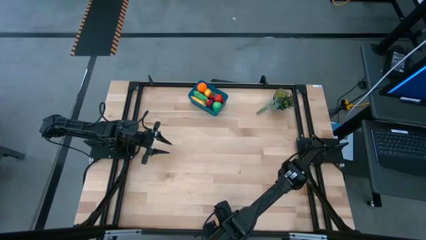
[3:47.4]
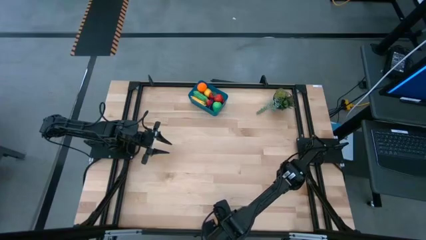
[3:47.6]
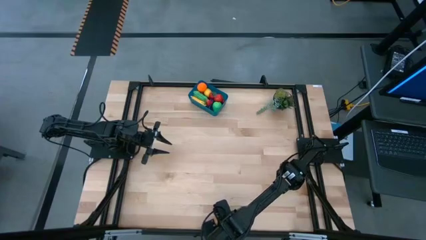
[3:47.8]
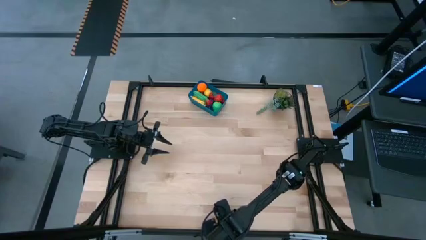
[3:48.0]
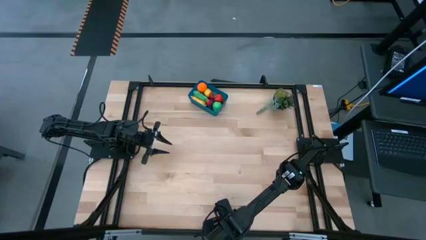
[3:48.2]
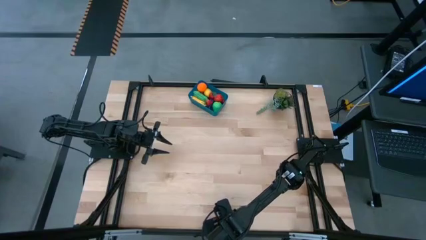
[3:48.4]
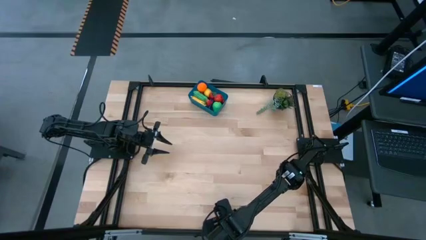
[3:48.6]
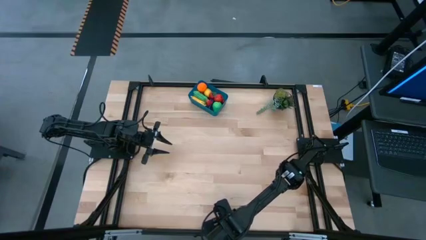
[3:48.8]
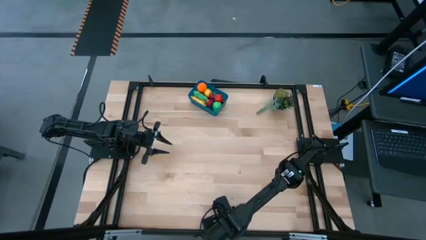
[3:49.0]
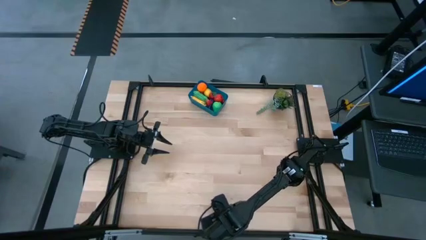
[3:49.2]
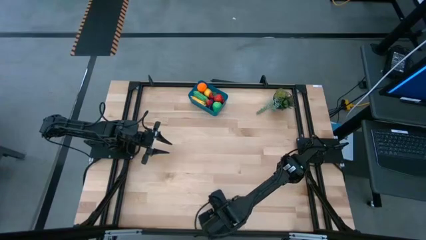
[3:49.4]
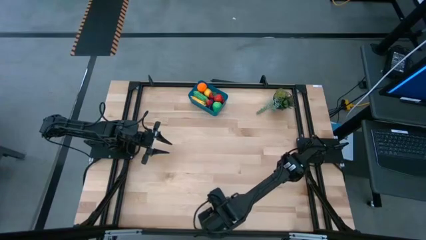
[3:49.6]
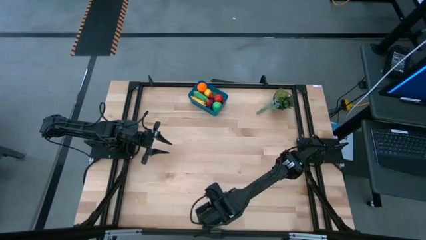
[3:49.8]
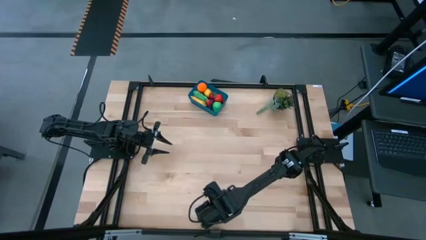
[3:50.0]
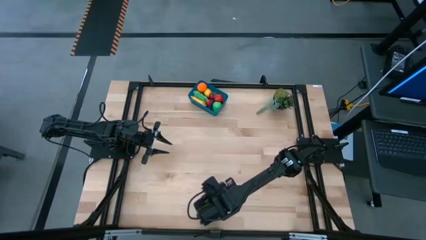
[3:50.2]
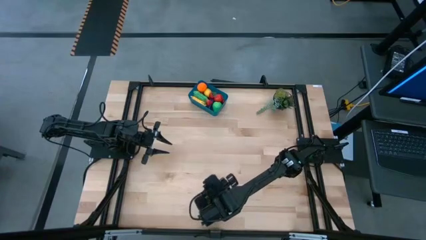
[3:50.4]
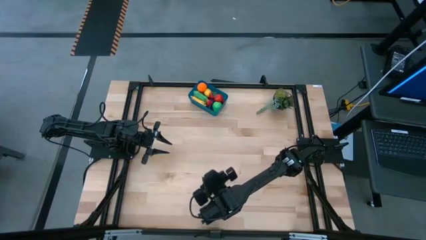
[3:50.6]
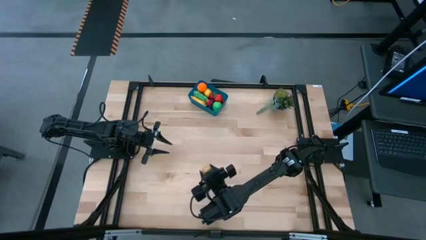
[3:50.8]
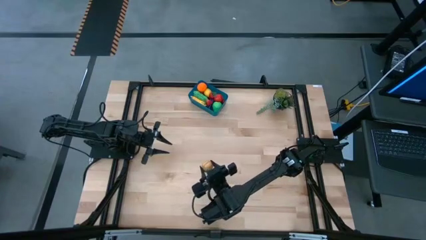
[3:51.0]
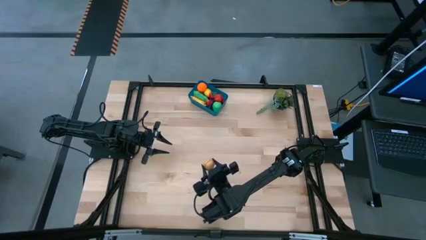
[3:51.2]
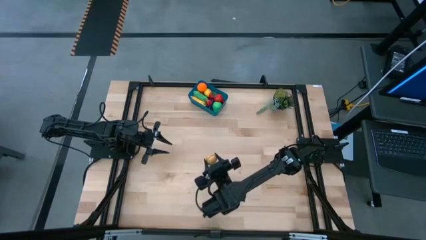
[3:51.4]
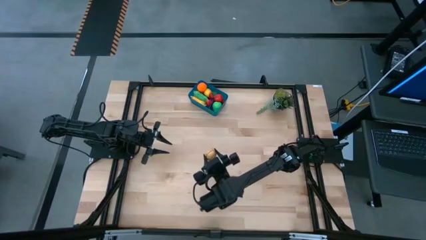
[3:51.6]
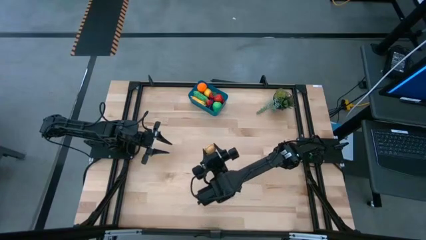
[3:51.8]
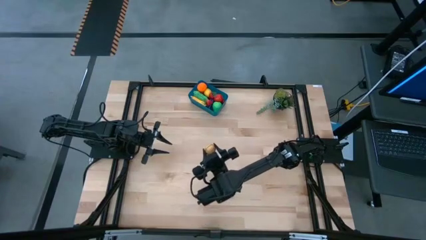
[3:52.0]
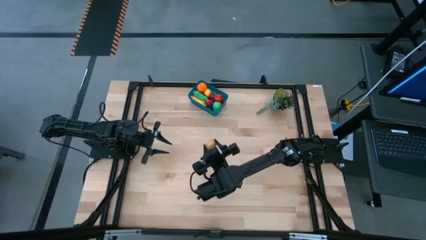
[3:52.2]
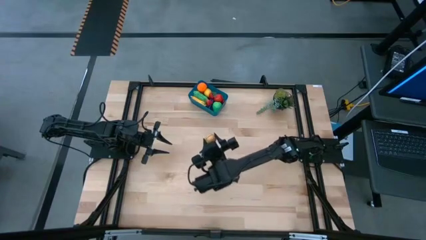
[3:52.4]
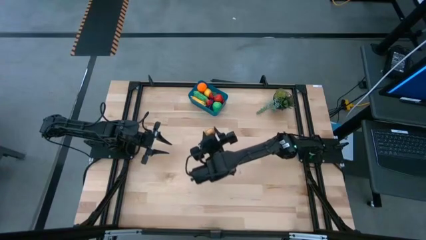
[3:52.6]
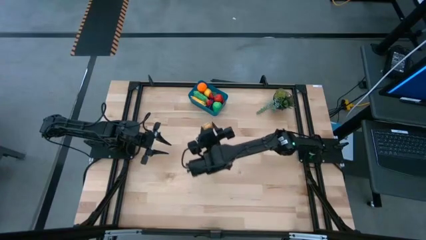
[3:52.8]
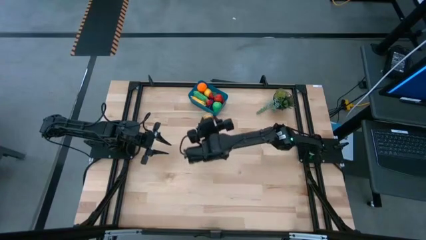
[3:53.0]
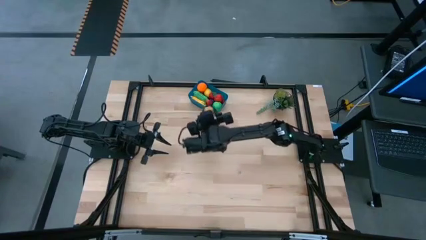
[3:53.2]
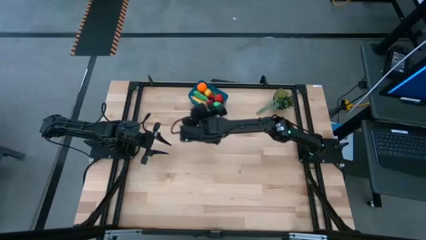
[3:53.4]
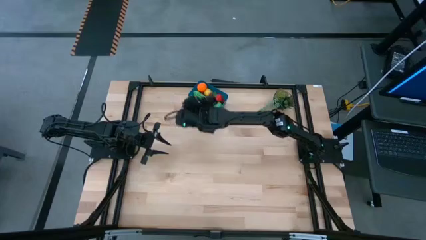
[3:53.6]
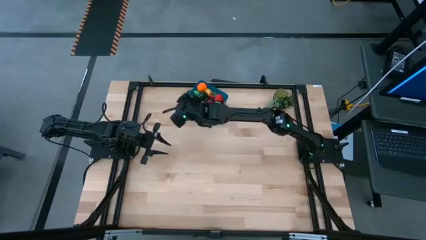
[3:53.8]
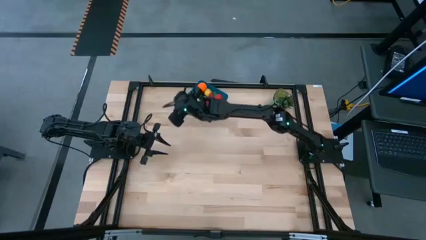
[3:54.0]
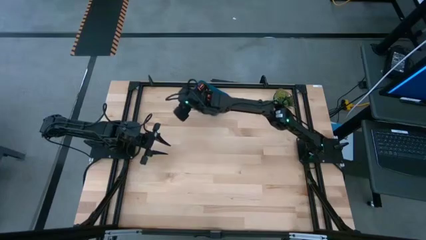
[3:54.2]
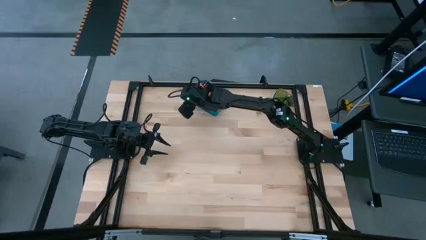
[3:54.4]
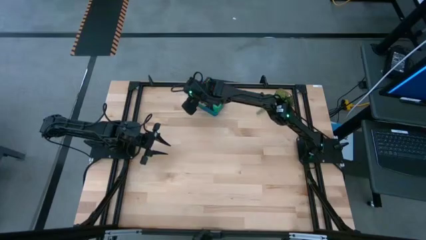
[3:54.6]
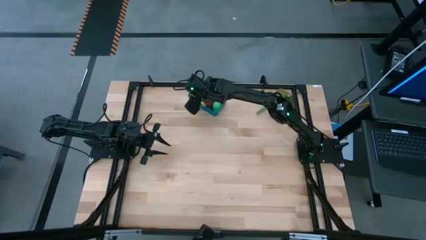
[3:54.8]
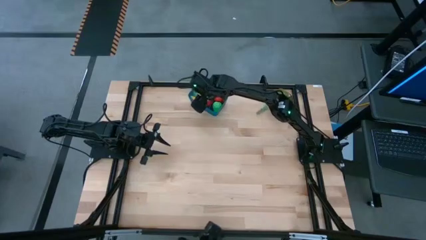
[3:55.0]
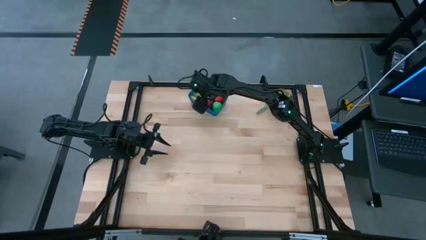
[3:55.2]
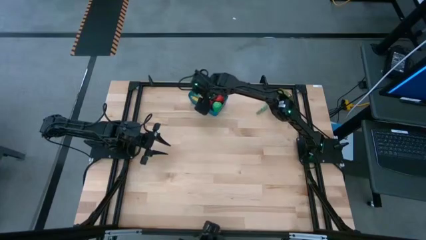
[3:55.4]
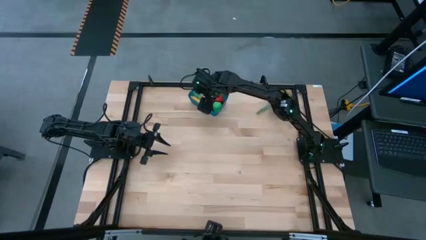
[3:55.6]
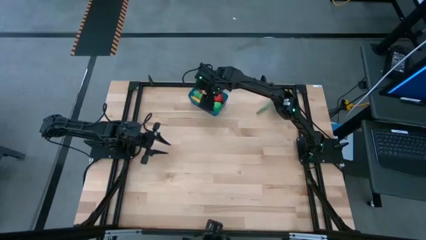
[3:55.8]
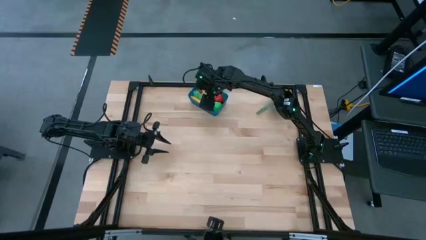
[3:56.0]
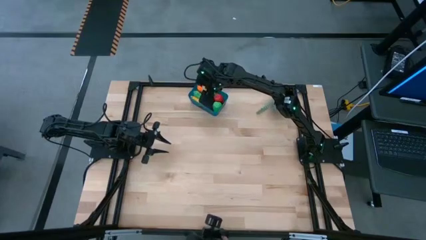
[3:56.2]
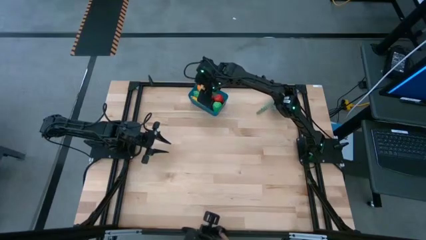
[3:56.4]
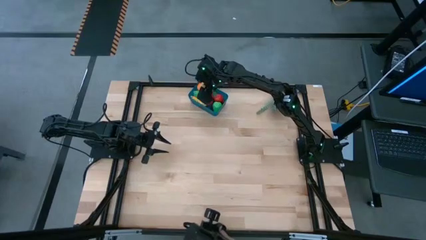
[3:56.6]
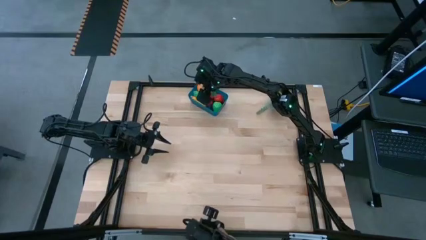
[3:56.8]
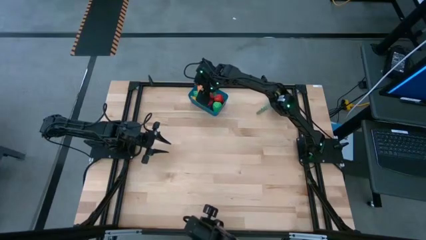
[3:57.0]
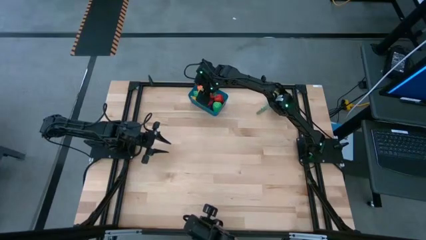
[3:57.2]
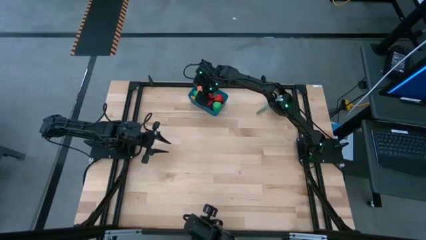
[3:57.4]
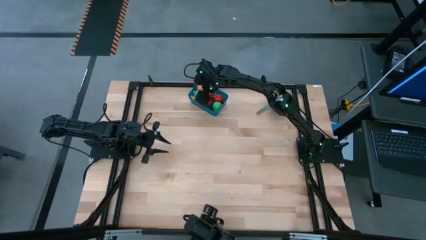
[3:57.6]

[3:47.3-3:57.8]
Task: Pick and placing Produce into tupperware
Put the brown potato into the blue bin

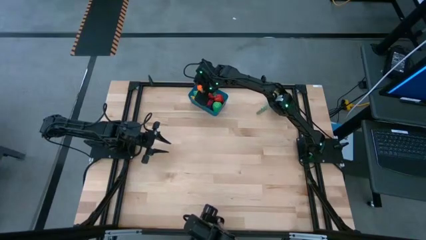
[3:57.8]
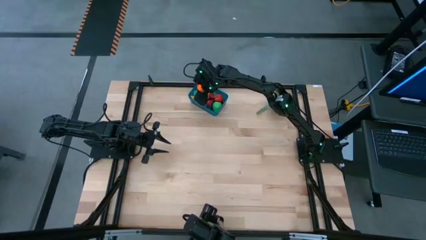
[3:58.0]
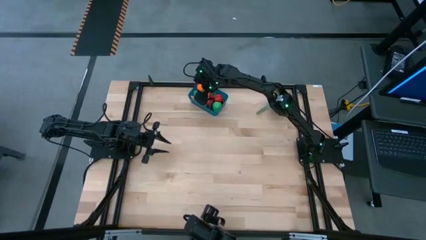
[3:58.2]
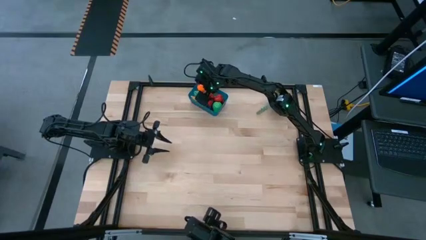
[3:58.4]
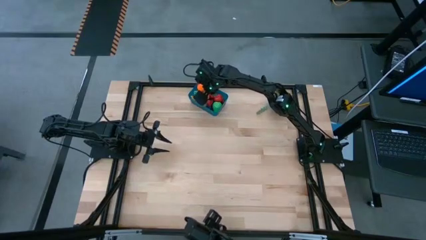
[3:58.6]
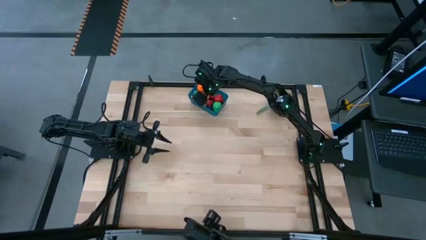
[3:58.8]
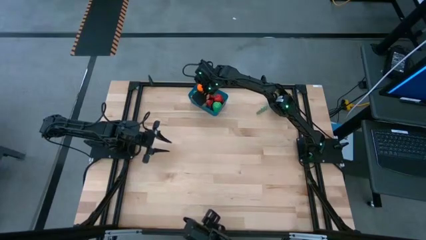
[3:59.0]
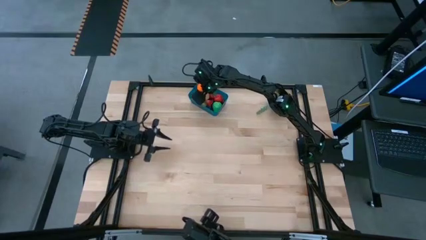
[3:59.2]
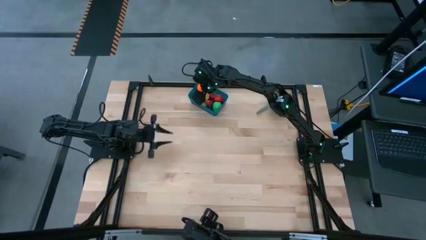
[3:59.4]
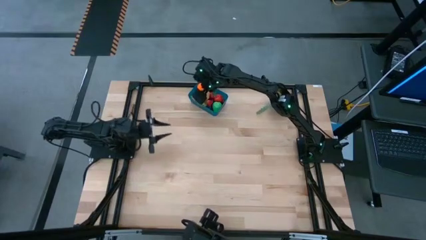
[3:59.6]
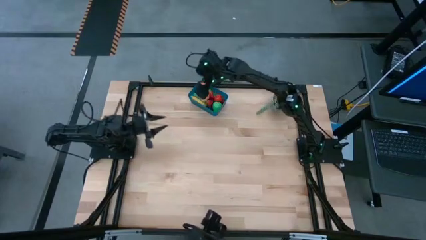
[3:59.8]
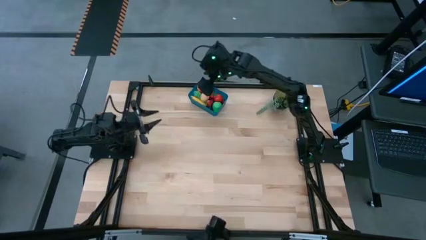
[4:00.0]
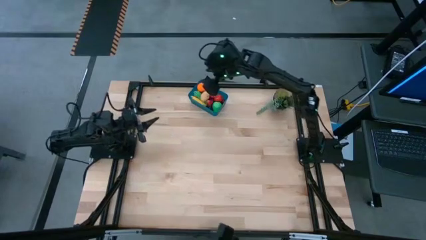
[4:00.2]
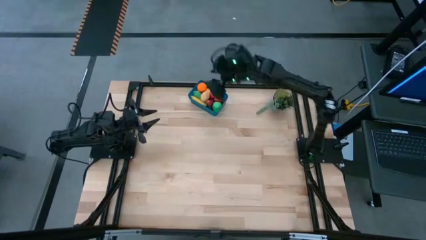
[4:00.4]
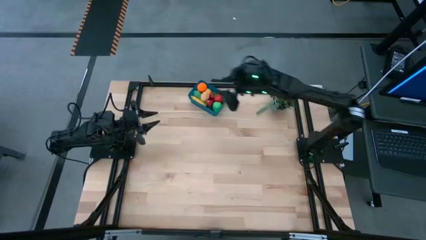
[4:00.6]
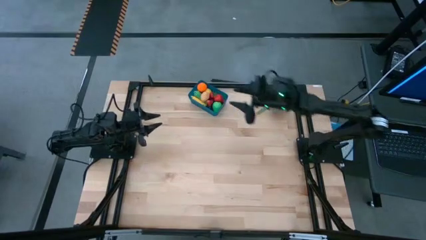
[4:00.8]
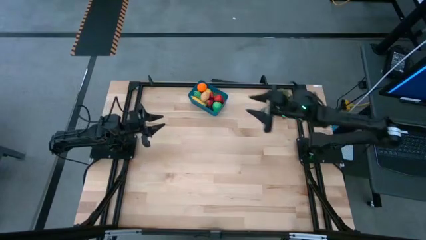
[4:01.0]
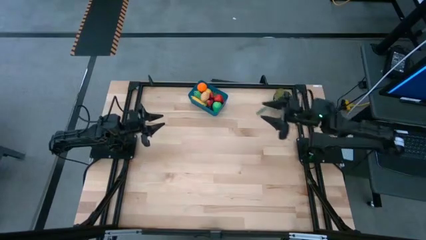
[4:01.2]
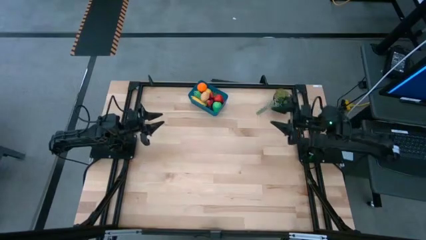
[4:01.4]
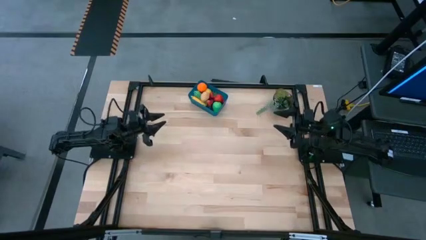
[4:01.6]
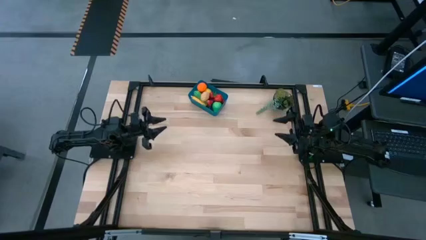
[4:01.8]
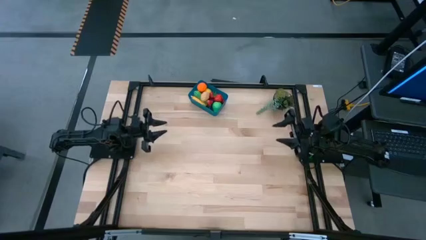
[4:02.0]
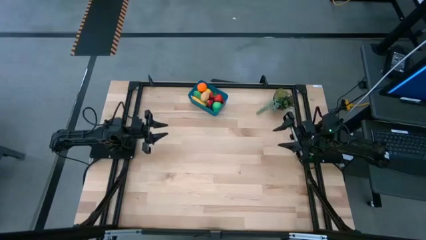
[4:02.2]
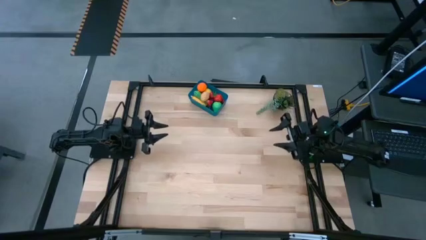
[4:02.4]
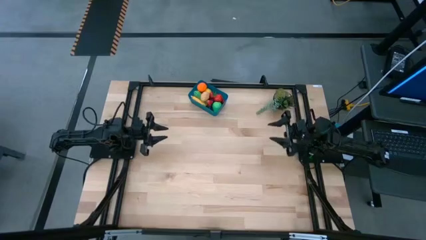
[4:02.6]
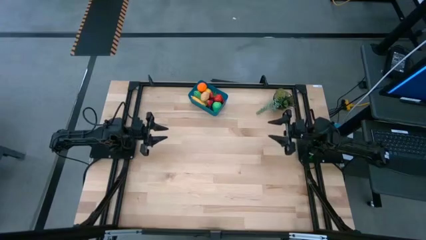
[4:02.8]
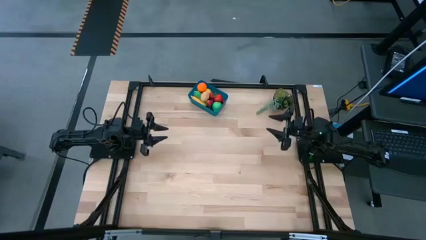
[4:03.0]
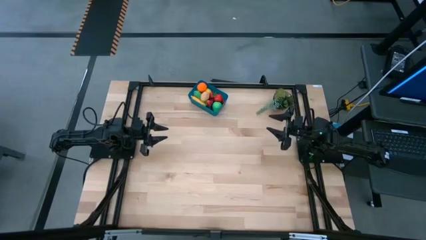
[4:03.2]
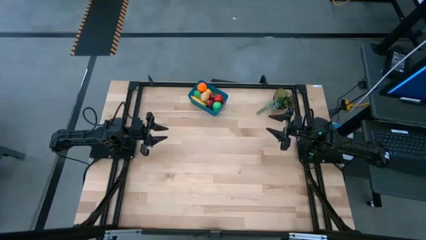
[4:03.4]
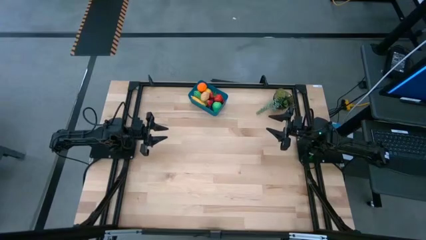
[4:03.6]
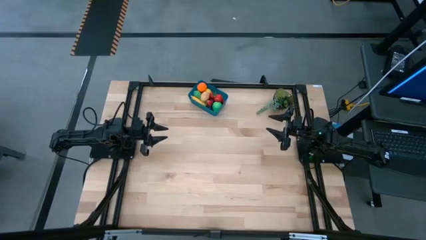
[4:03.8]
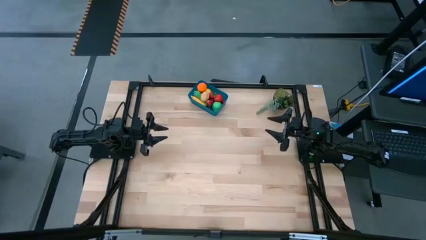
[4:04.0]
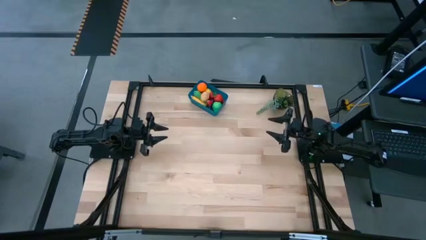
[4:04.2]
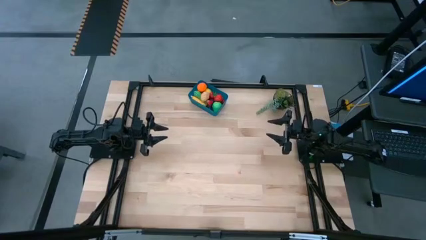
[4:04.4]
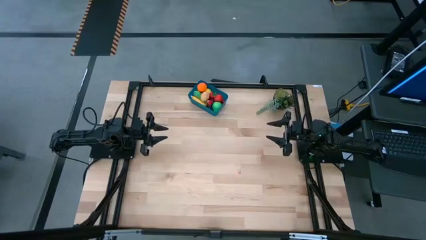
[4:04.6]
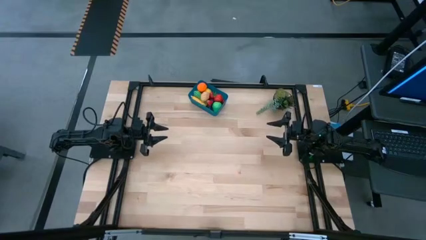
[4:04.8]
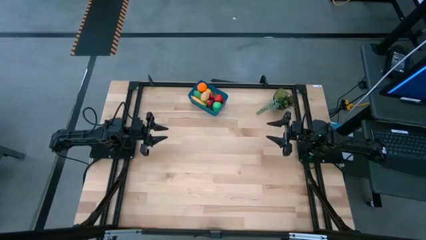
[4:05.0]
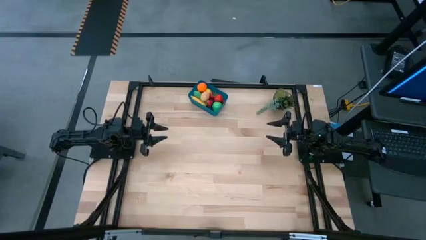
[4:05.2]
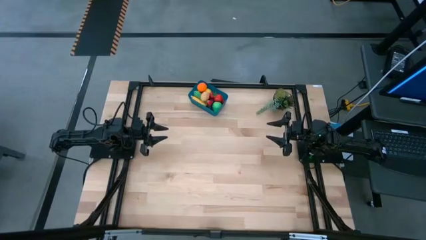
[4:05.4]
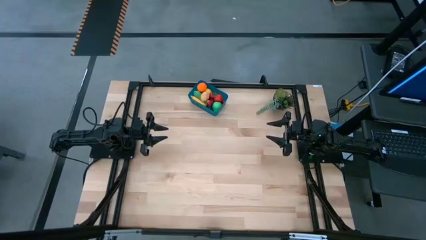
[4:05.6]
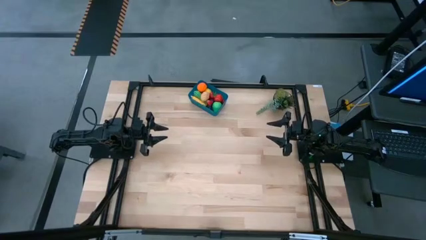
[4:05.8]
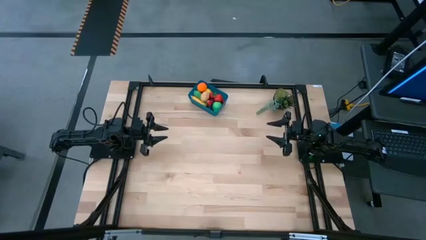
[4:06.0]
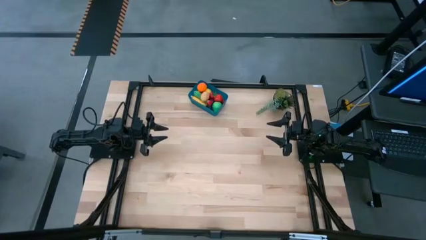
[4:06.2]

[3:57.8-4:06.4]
Return to Home Position
